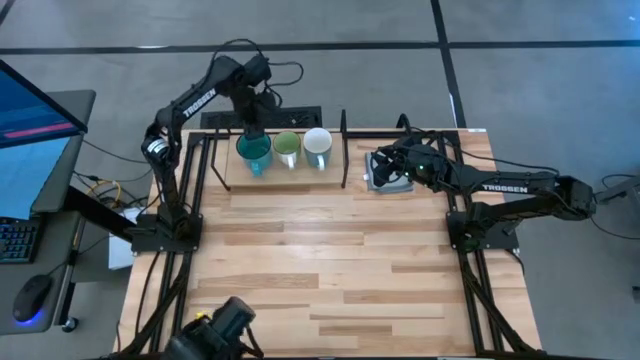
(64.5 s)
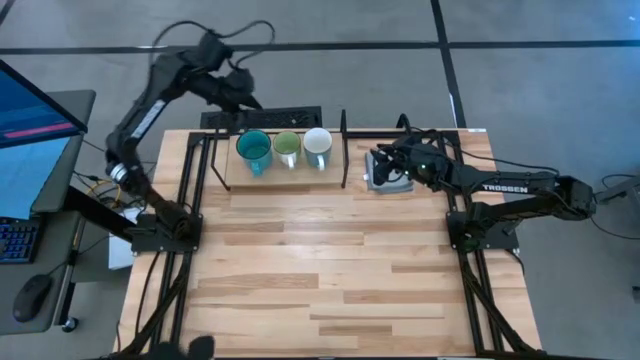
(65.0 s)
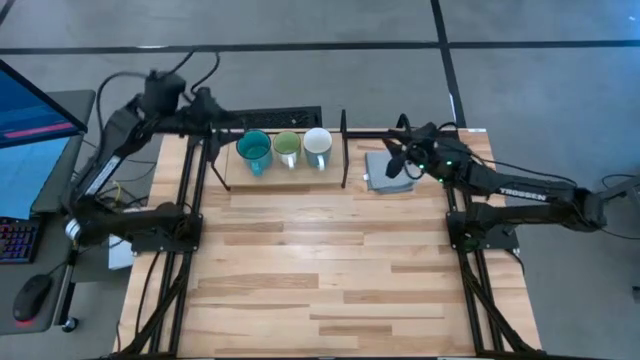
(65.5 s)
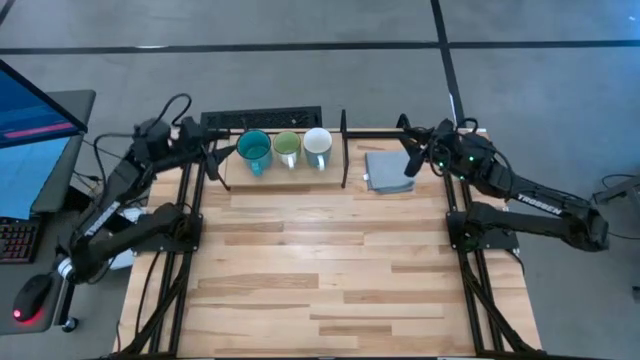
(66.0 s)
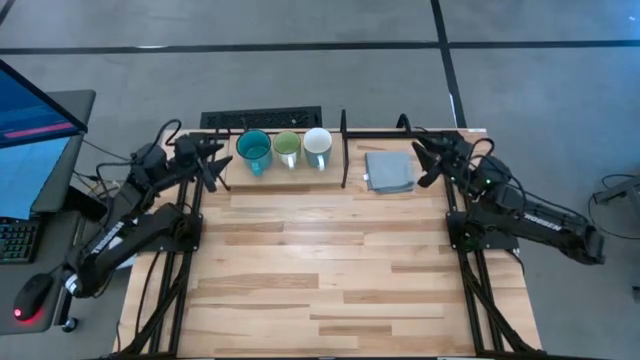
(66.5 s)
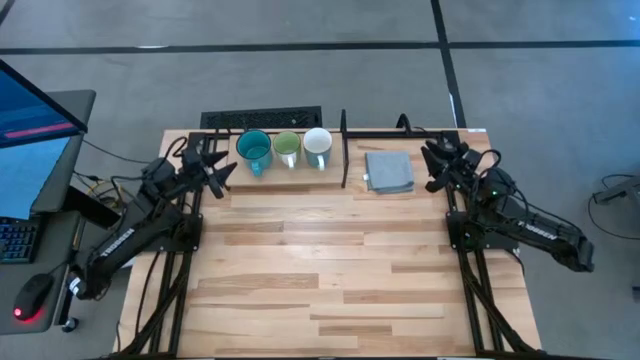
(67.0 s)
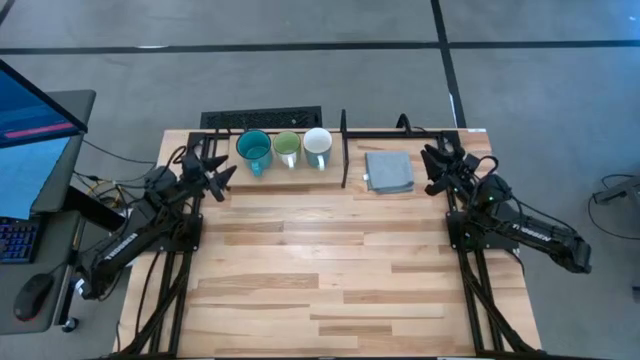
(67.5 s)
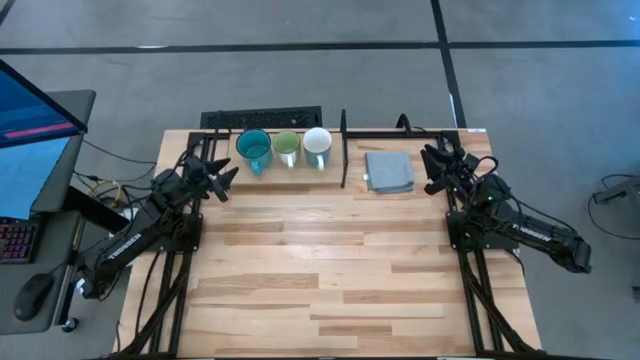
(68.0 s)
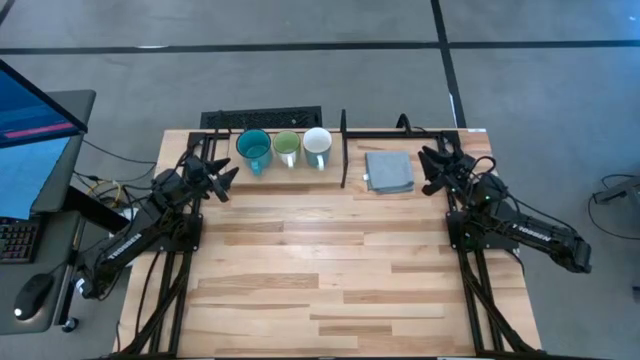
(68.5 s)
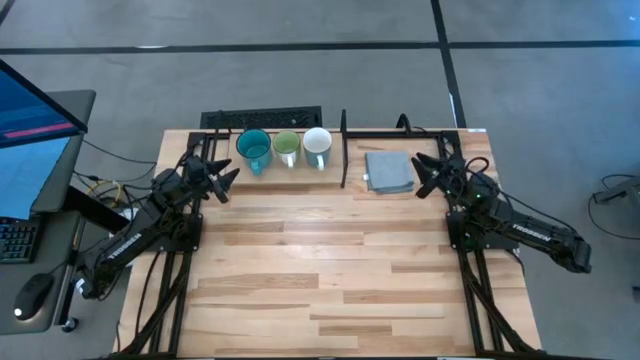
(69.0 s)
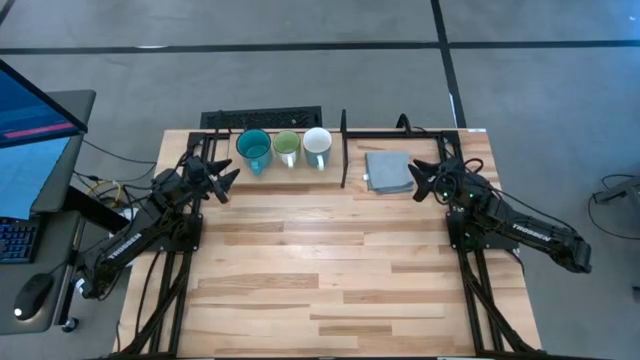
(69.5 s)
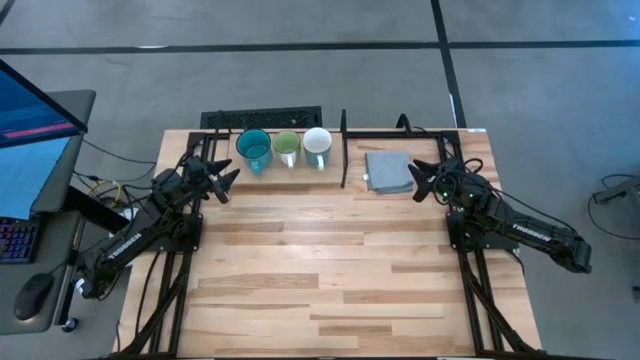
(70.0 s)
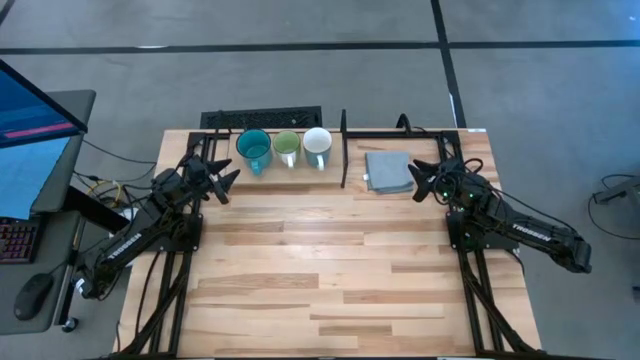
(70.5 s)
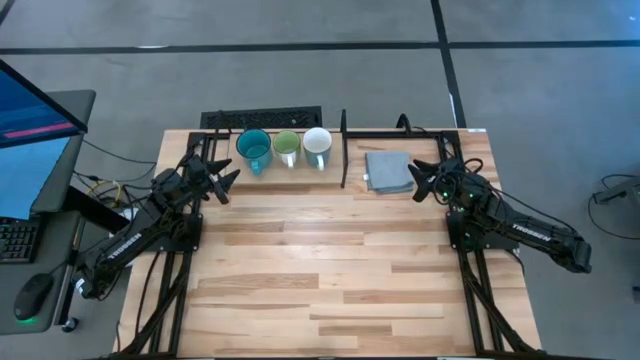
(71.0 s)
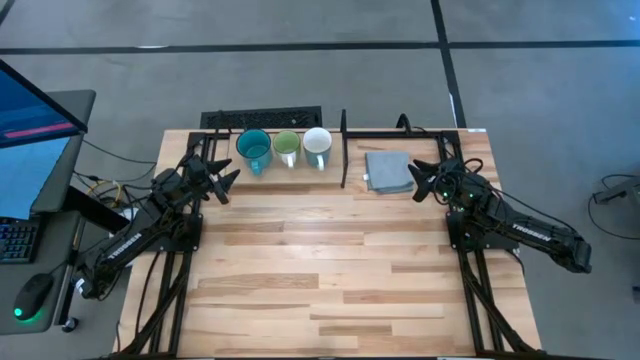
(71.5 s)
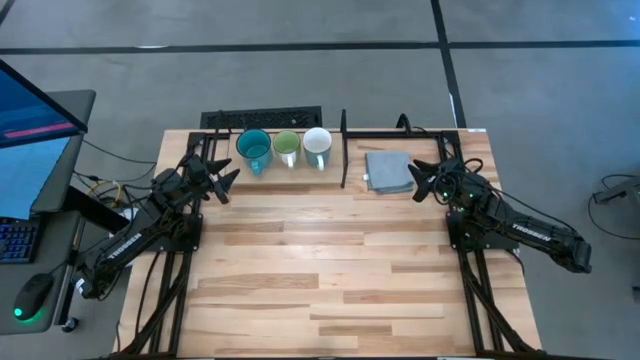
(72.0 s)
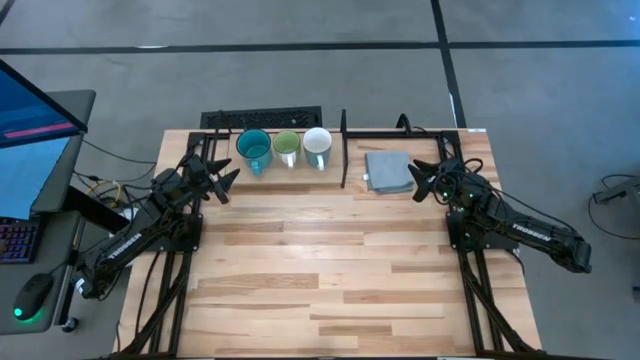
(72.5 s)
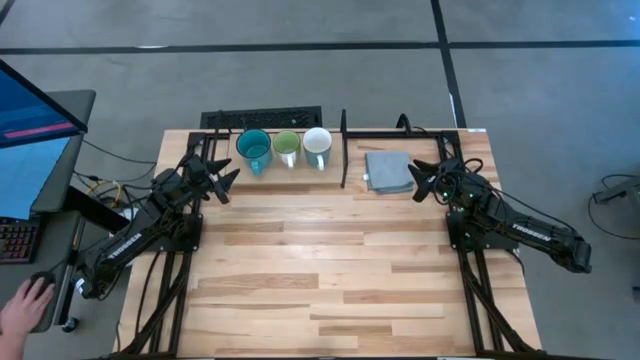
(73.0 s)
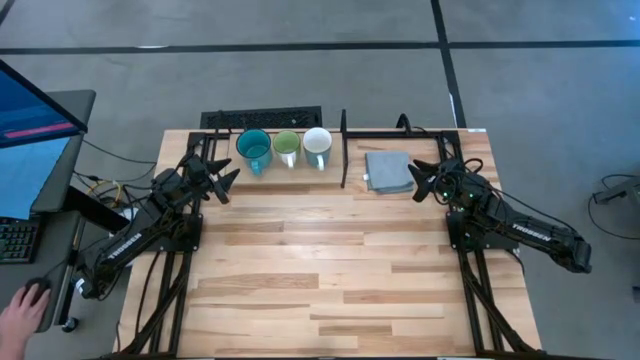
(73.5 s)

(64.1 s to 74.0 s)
Task: Stack small to large cups/mugs on shelf
Return to Home Position

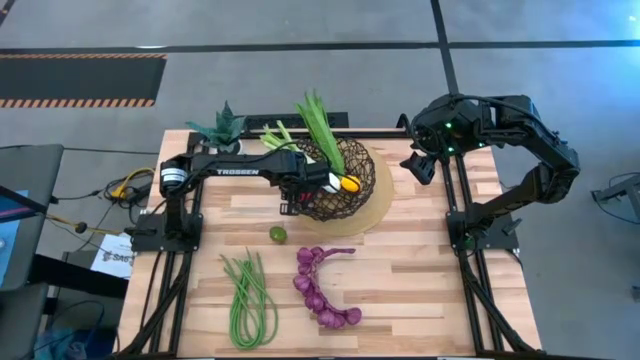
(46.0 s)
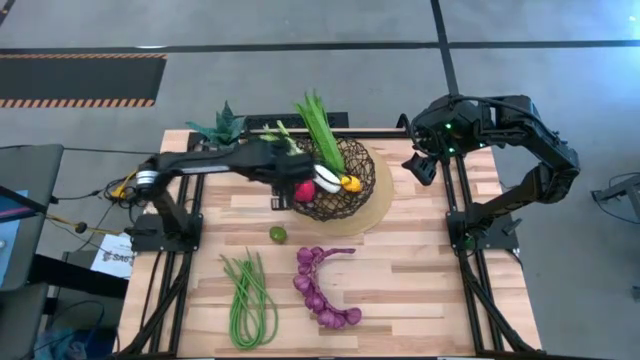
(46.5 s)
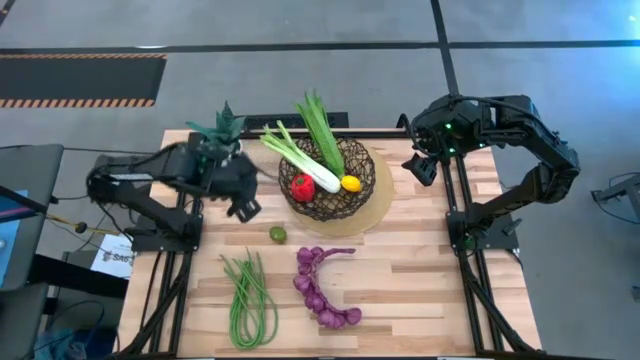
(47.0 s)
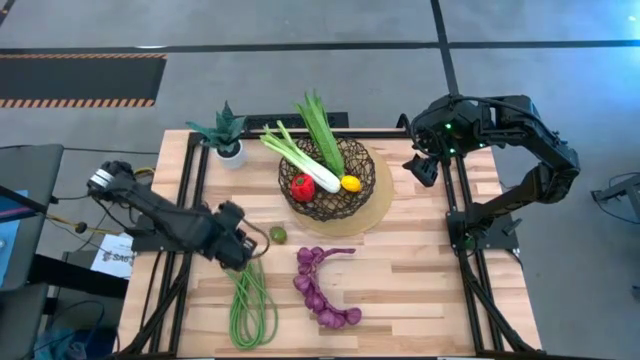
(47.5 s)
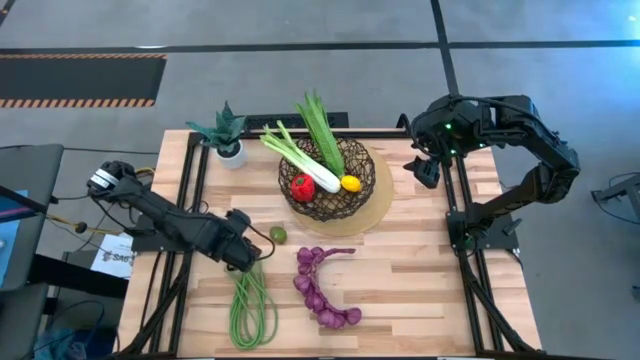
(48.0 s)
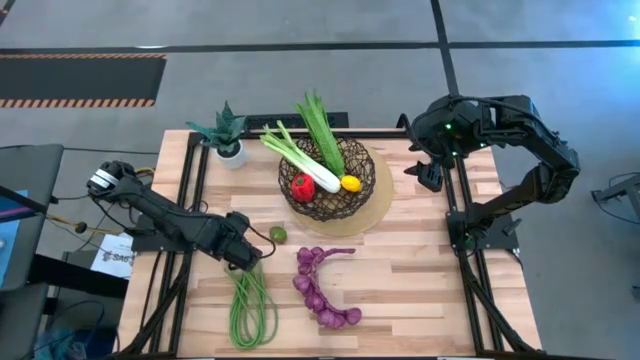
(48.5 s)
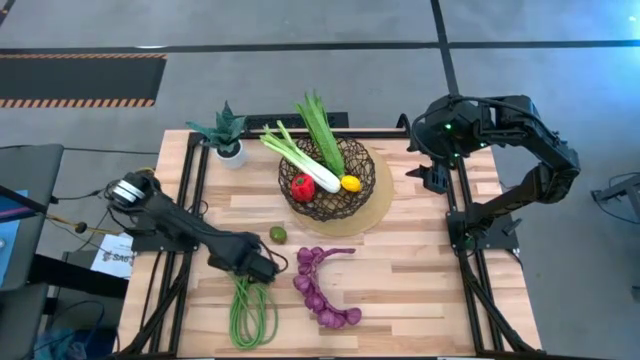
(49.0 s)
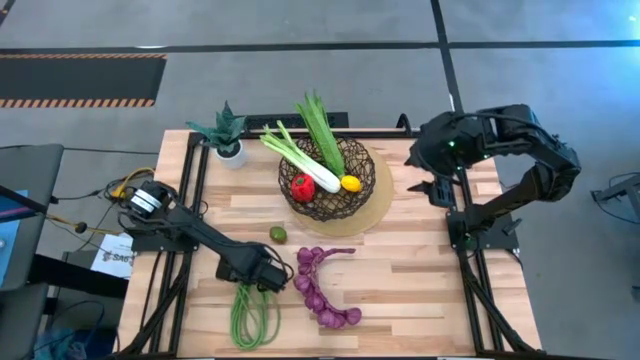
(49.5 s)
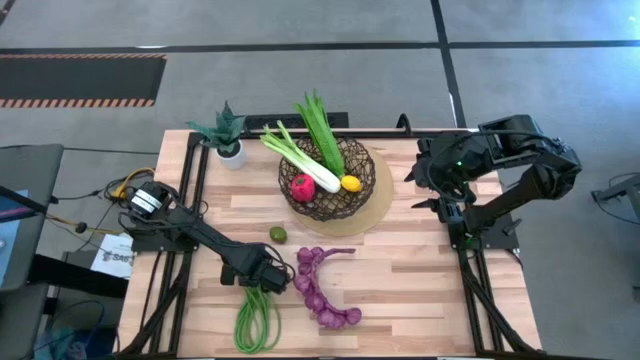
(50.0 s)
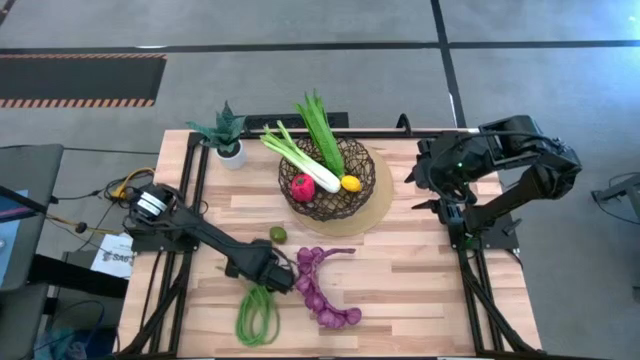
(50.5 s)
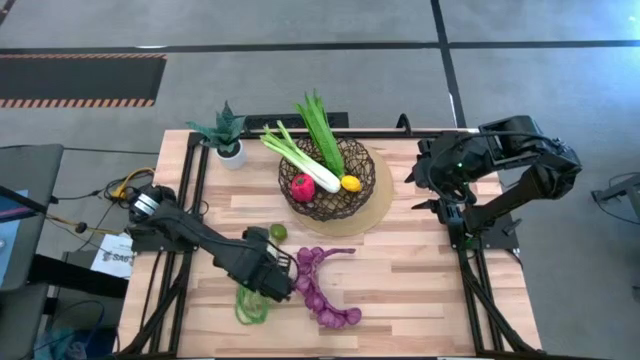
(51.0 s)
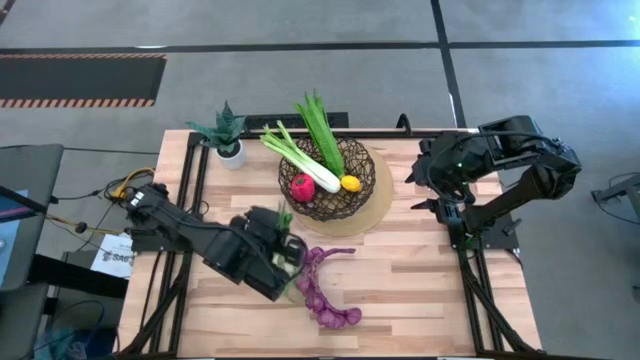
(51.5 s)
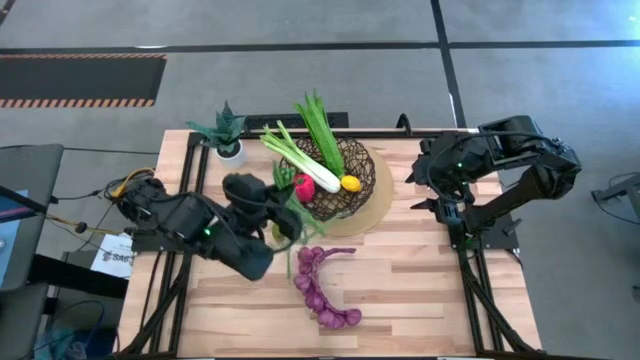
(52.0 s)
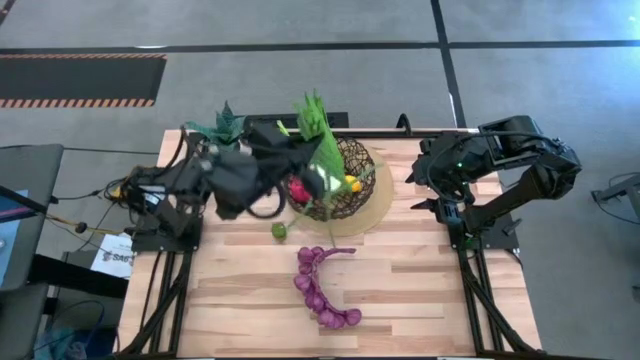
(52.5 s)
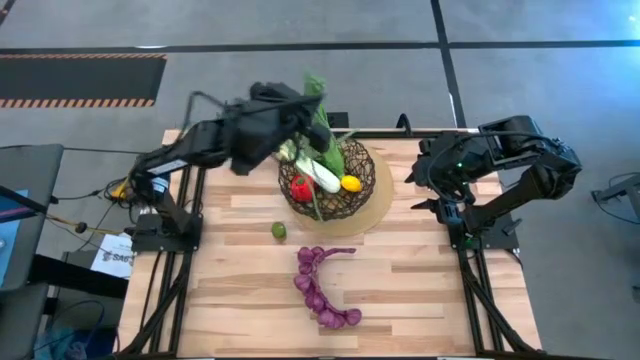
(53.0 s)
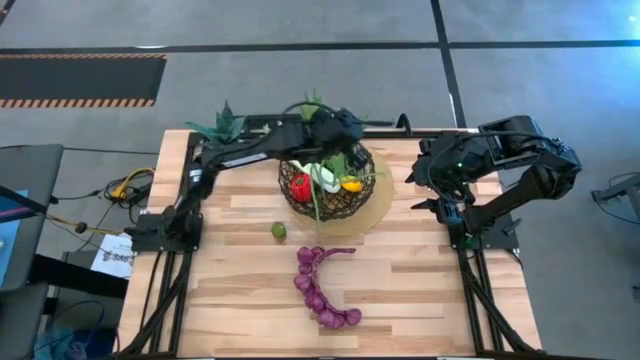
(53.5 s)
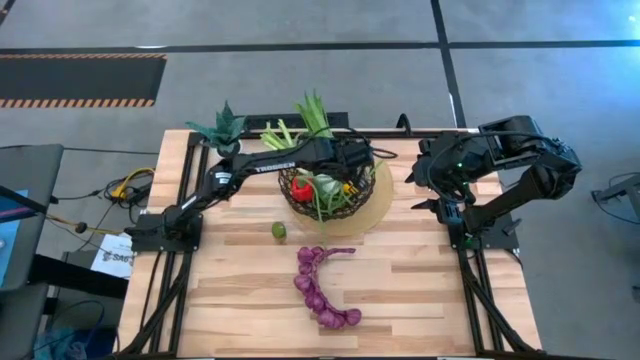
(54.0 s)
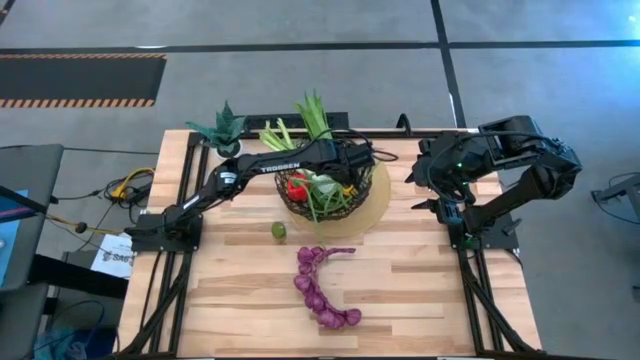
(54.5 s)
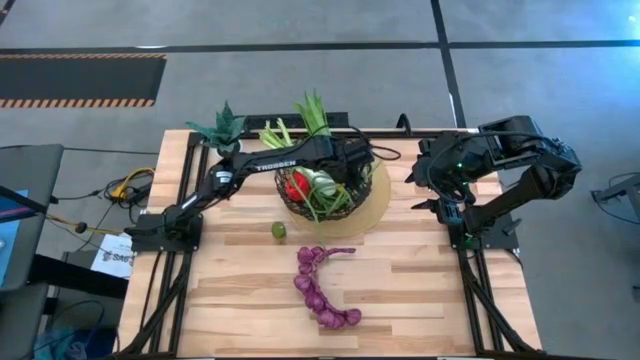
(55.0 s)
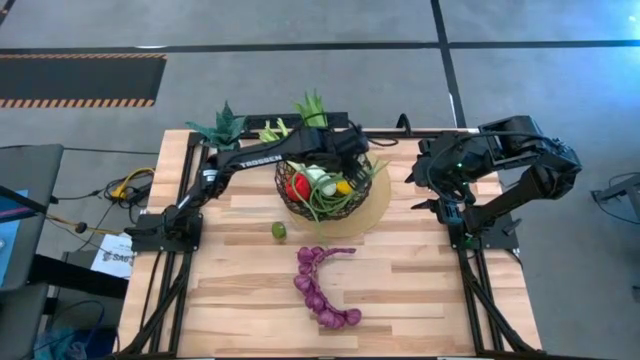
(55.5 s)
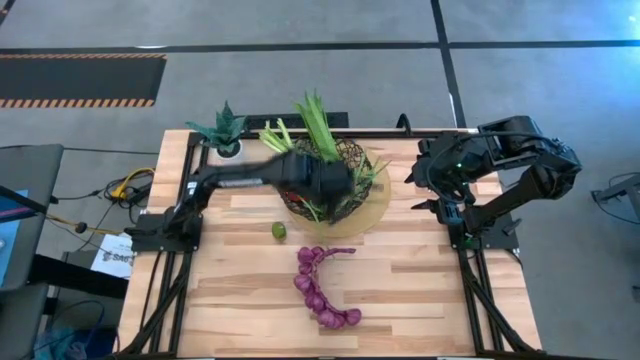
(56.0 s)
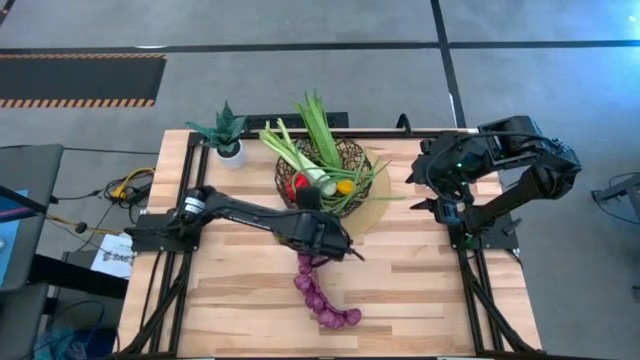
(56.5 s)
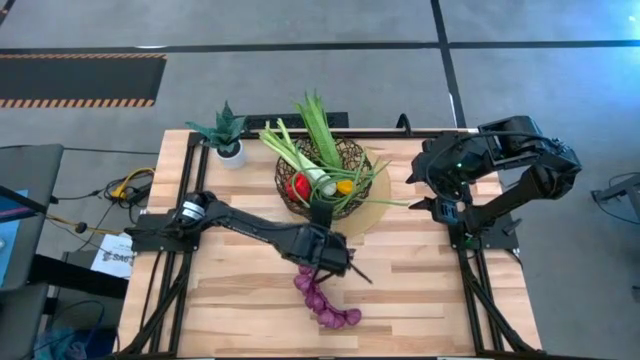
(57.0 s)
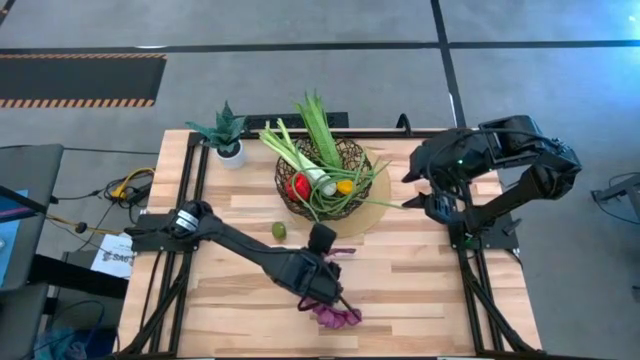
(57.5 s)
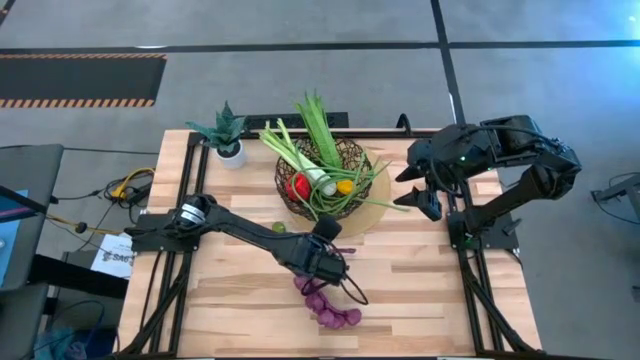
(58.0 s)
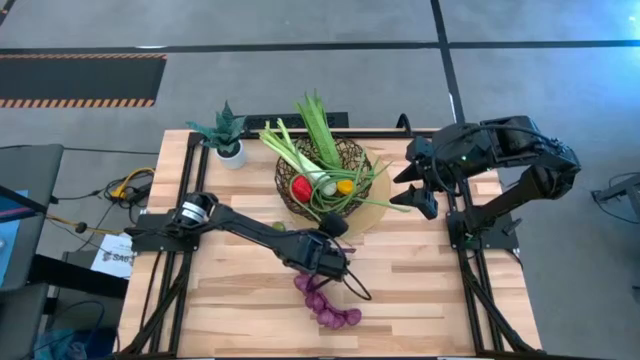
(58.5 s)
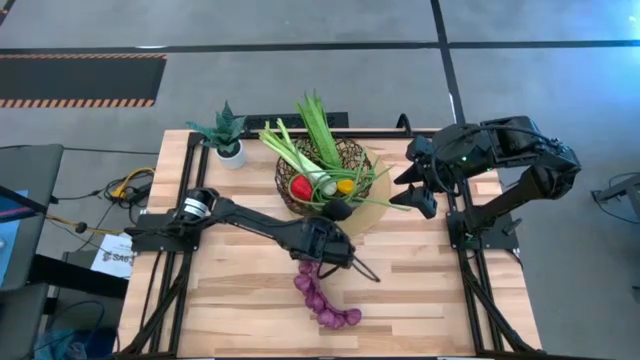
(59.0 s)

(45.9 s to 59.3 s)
Task: Build produce basket
Put the string beans into the basket
